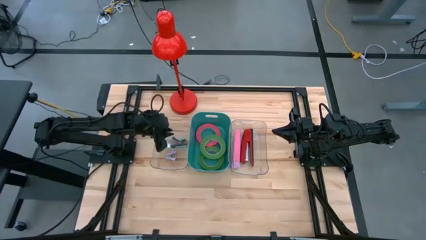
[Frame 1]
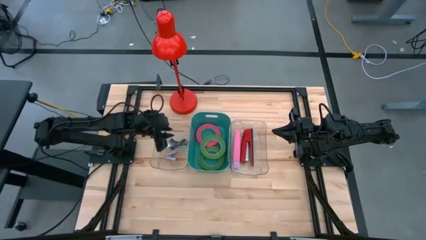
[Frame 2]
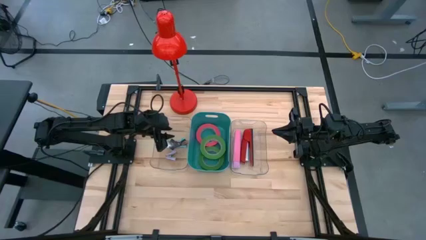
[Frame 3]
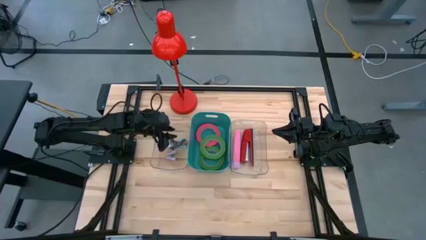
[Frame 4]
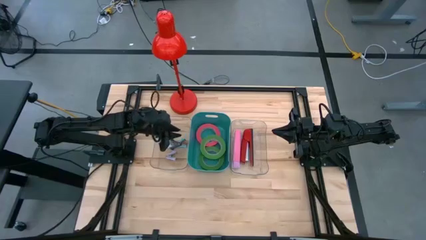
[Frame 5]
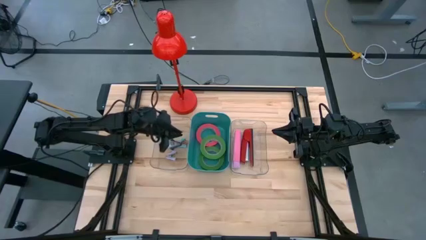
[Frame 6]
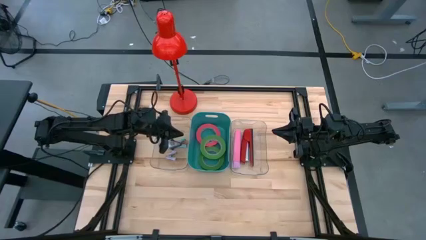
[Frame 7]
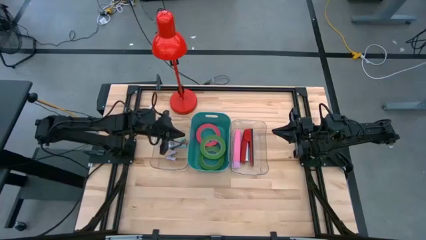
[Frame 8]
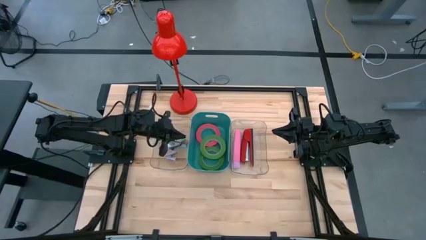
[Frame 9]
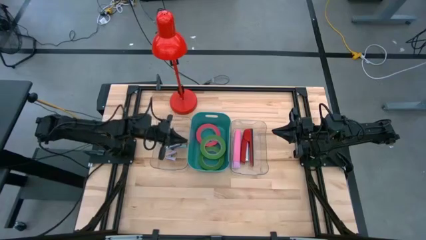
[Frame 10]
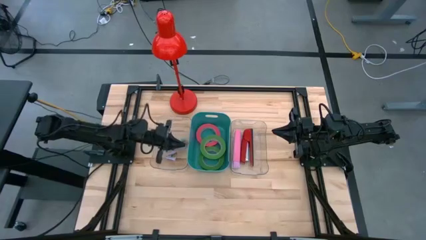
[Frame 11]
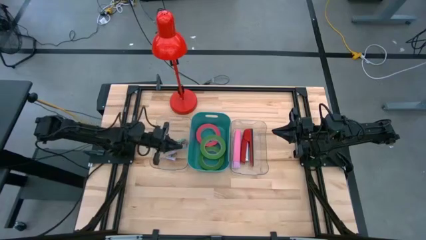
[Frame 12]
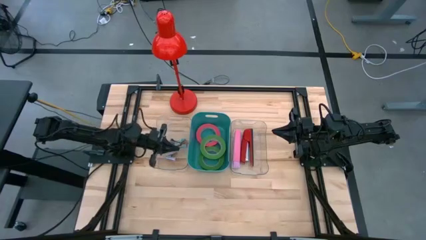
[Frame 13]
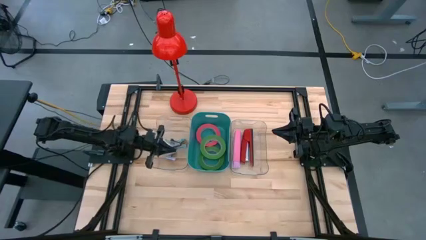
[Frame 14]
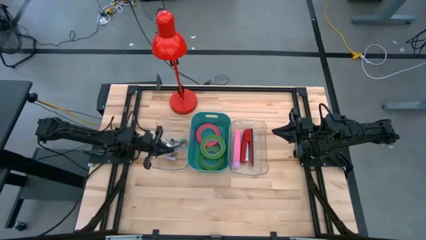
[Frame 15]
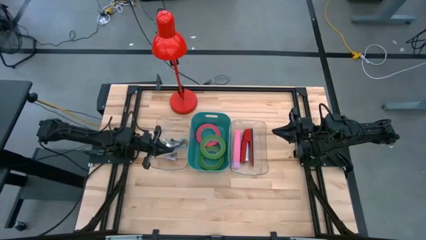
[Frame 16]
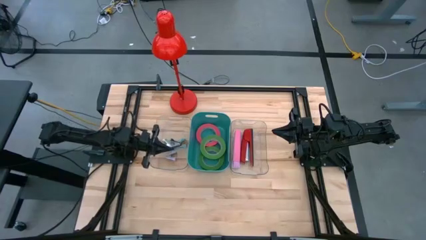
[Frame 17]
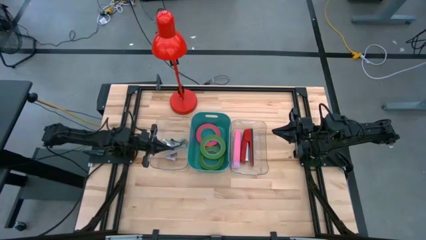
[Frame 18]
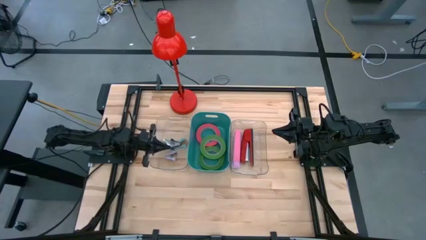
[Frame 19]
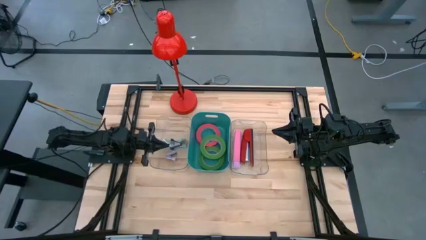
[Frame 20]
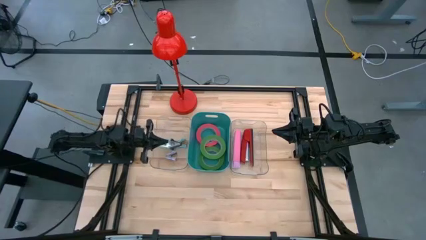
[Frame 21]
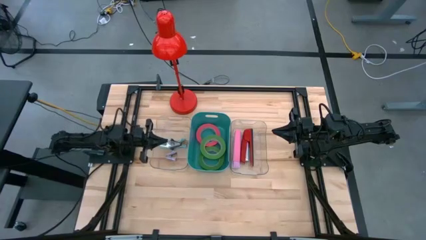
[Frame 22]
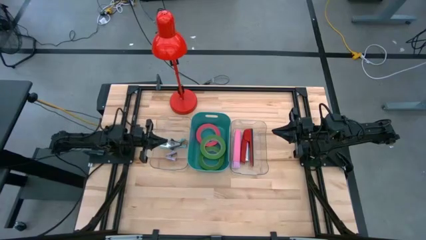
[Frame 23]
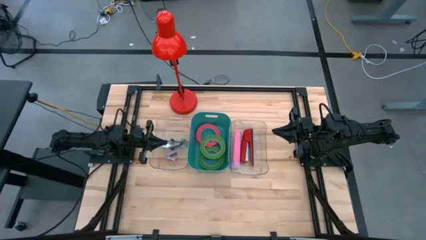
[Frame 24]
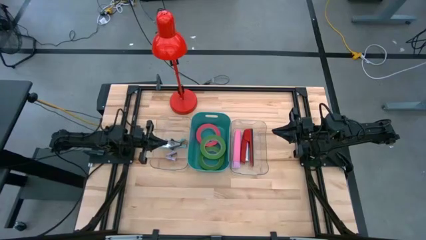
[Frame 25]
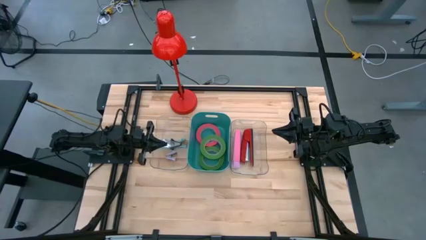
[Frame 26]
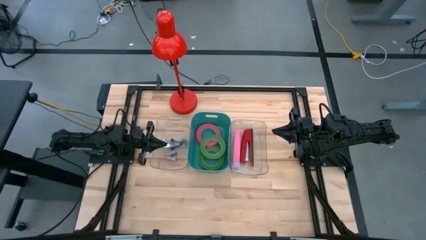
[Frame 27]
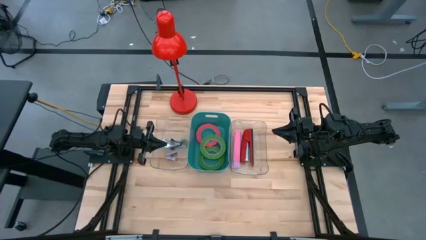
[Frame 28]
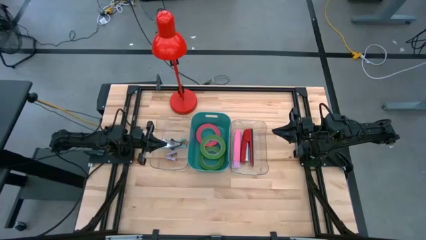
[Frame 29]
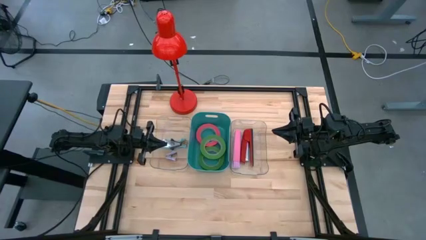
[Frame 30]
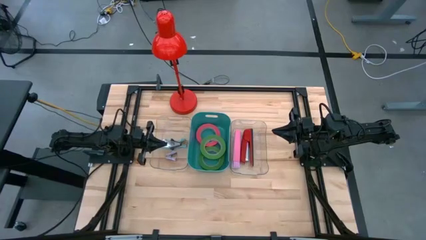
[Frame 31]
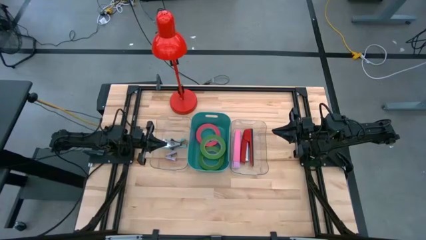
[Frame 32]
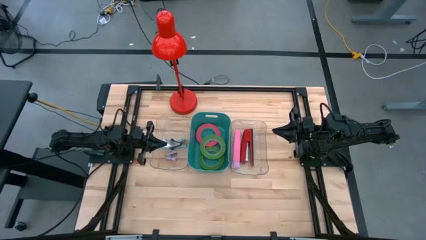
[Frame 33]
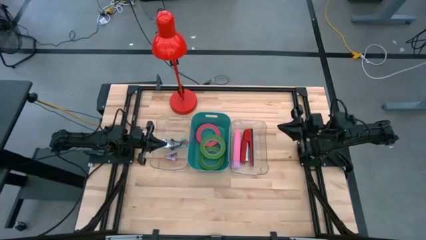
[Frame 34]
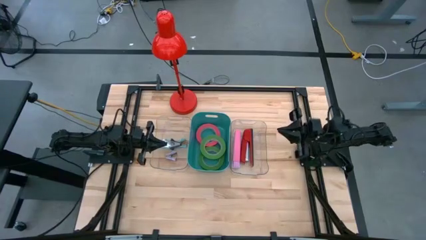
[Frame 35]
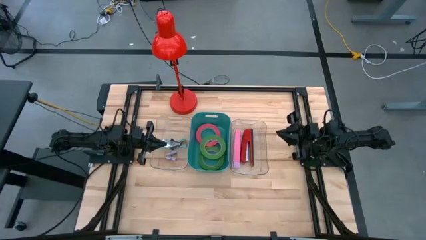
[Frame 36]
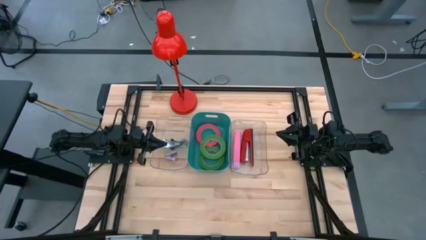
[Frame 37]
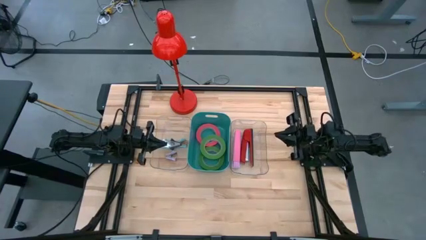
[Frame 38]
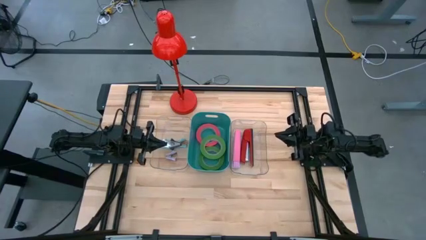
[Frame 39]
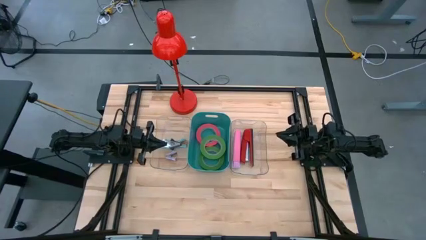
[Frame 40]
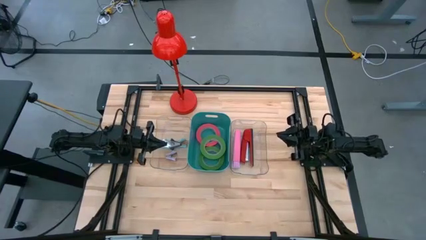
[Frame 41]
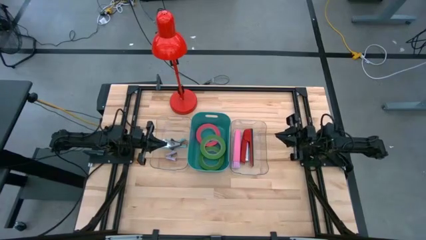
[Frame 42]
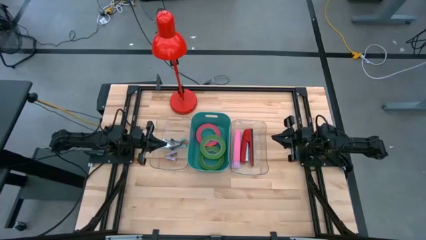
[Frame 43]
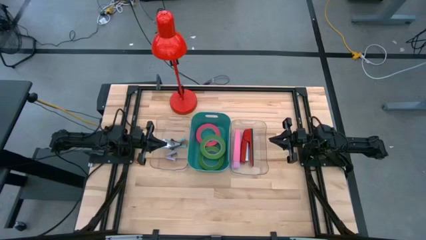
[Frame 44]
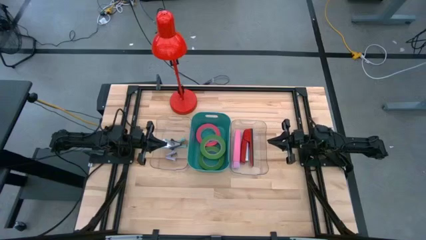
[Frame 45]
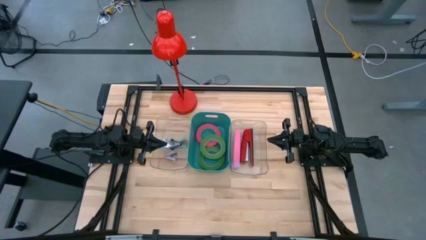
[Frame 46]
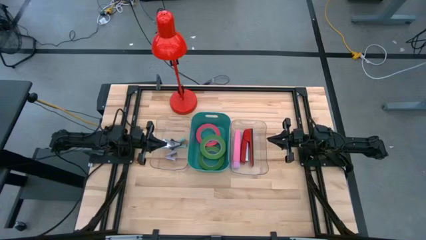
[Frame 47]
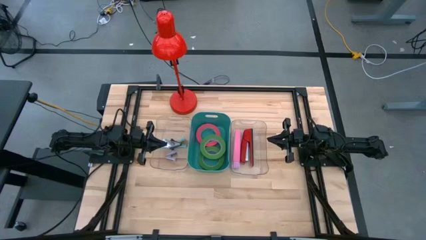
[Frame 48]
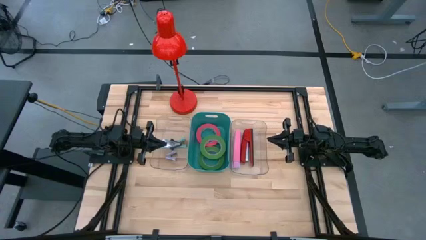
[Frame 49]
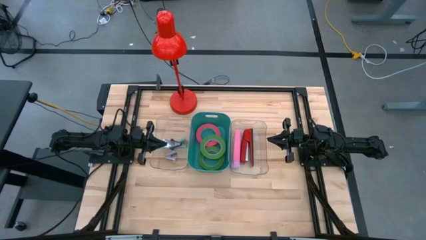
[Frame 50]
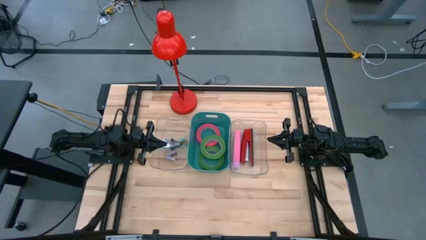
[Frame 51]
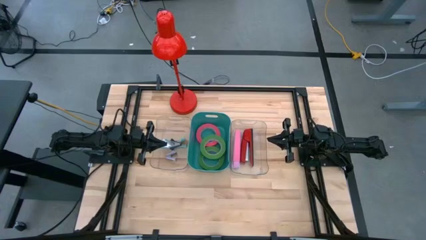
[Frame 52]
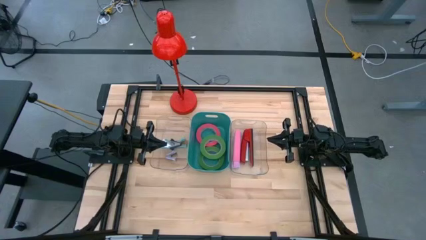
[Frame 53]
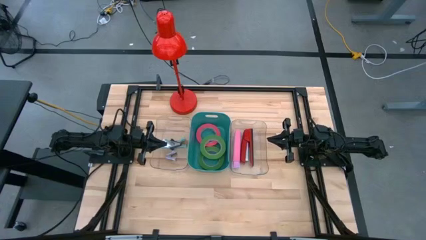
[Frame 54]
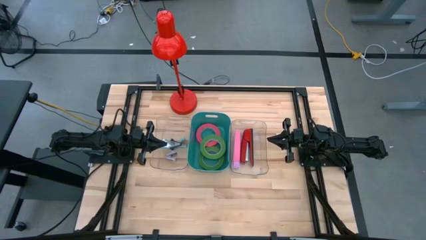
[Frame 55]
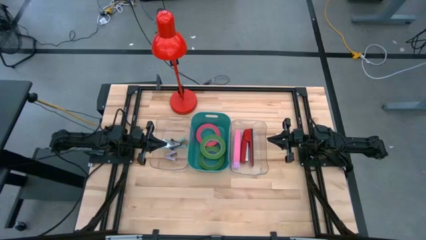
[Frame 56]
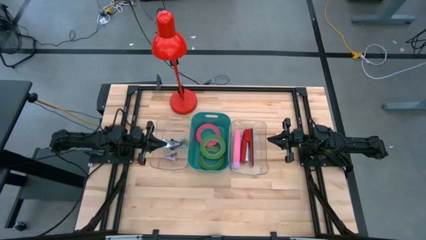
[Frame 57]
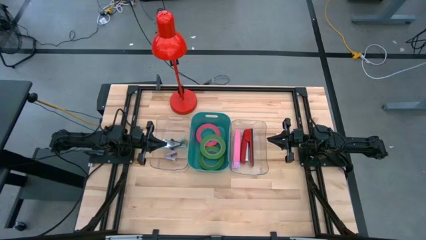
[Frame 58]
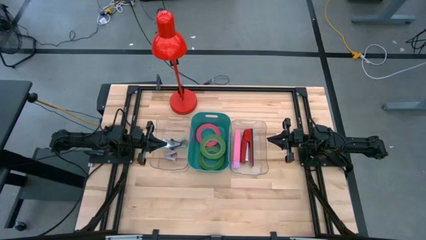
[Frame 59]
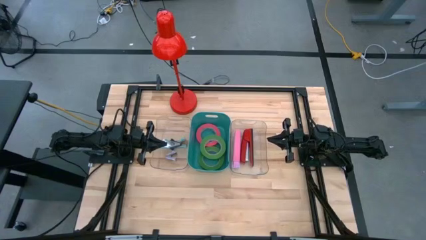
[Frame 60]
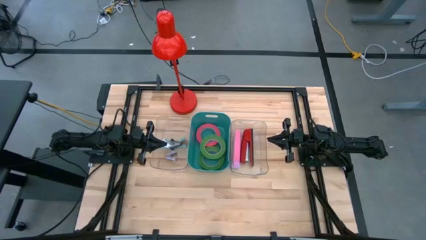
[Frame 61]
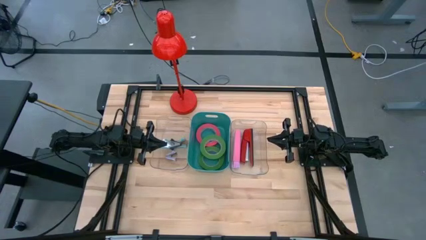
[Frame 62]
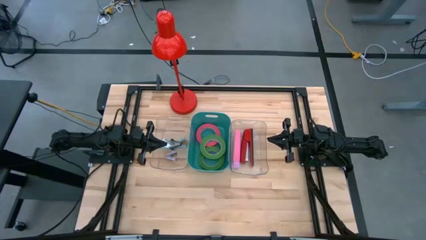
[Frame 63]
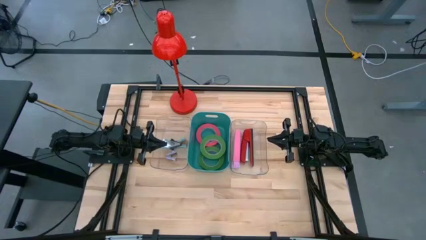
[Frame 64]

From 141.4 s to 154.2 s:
Task: Pick and place Stapler, Stapler remover, tape
Return to Home Position
